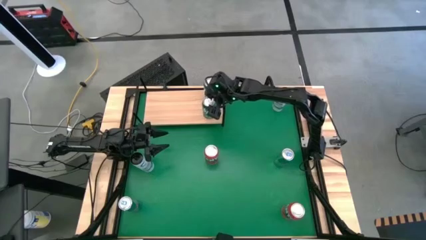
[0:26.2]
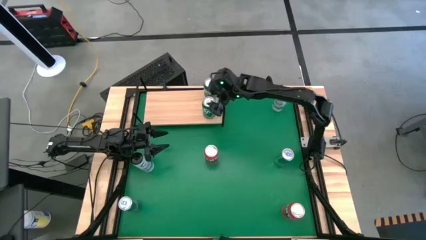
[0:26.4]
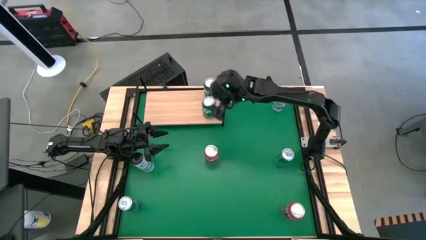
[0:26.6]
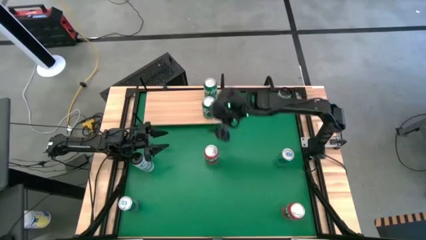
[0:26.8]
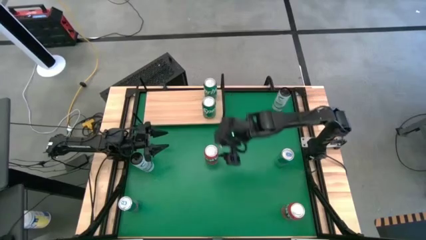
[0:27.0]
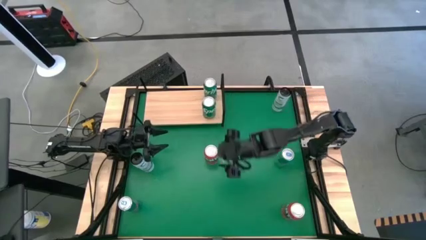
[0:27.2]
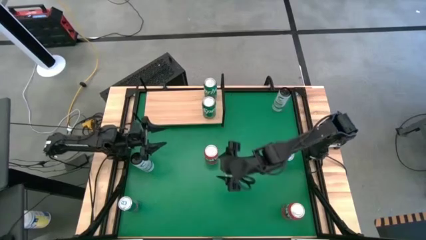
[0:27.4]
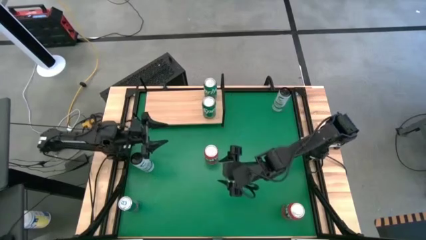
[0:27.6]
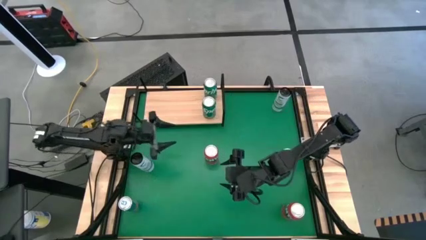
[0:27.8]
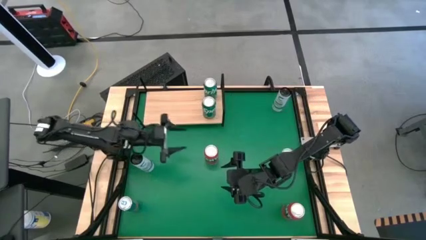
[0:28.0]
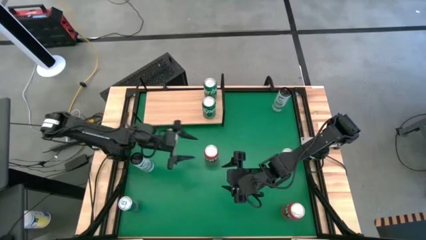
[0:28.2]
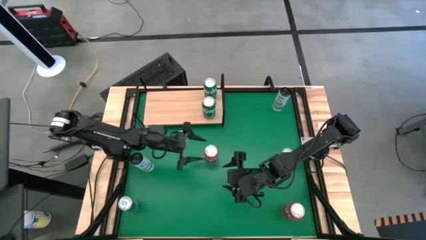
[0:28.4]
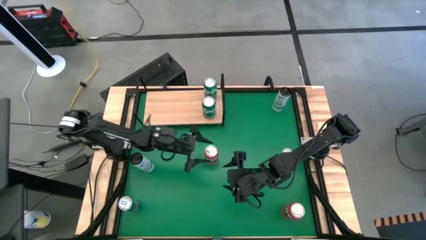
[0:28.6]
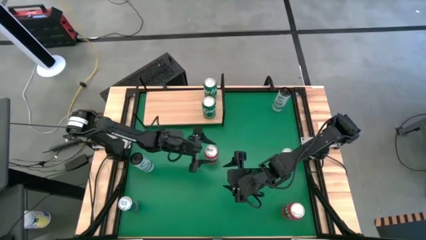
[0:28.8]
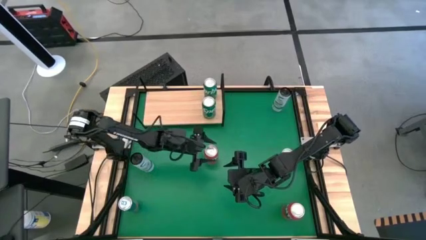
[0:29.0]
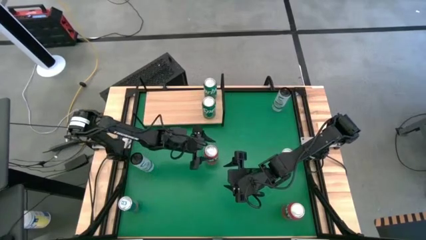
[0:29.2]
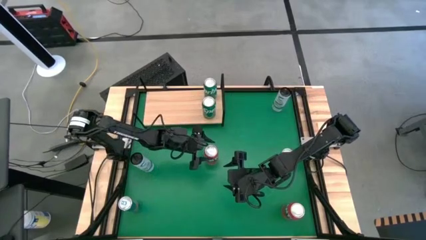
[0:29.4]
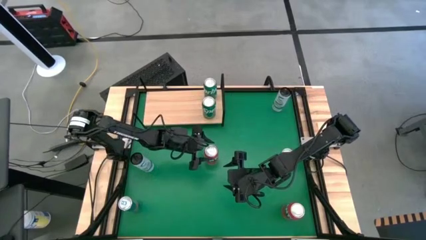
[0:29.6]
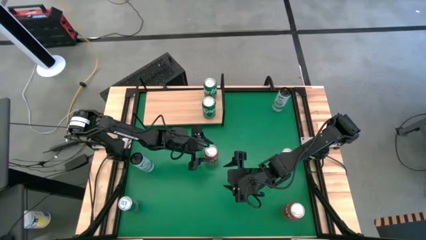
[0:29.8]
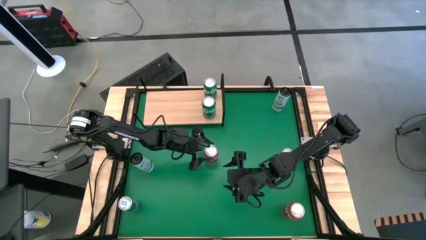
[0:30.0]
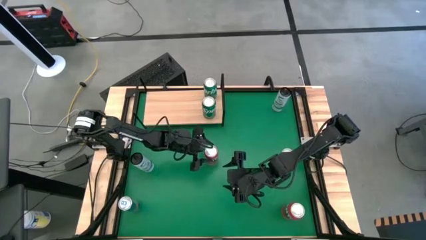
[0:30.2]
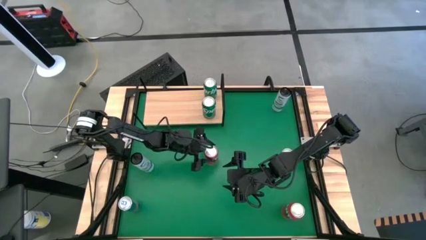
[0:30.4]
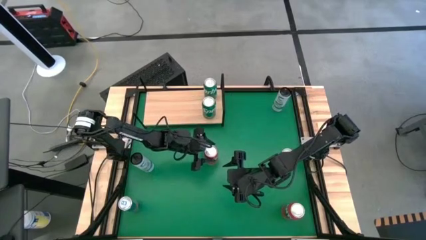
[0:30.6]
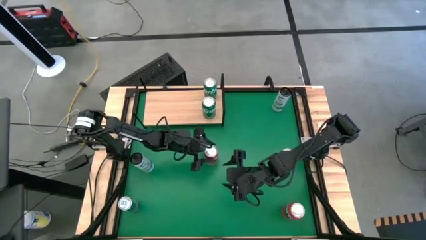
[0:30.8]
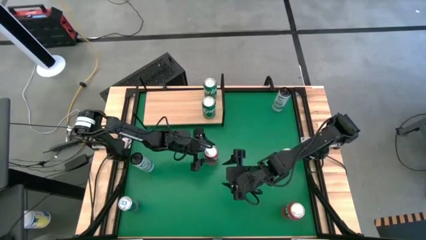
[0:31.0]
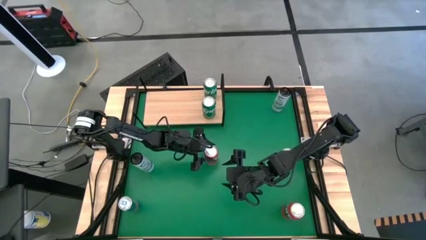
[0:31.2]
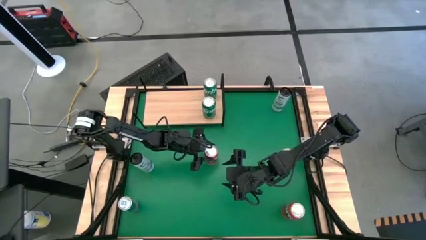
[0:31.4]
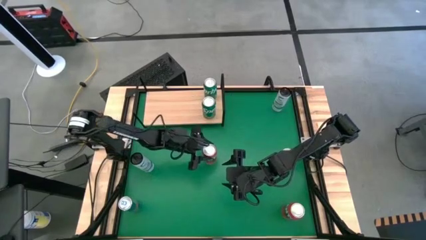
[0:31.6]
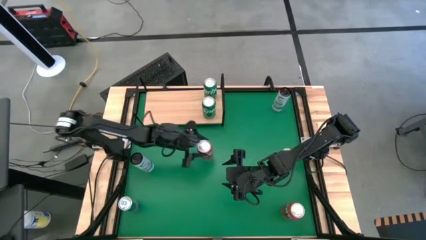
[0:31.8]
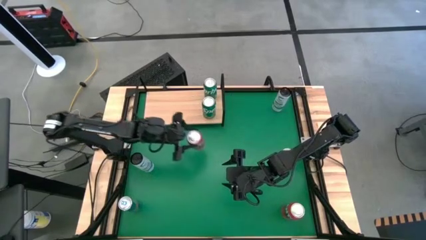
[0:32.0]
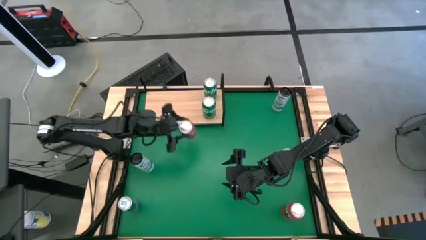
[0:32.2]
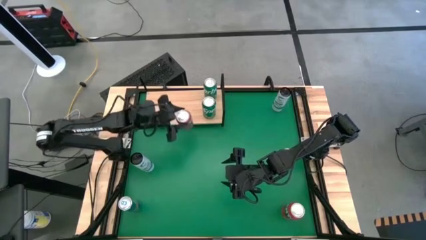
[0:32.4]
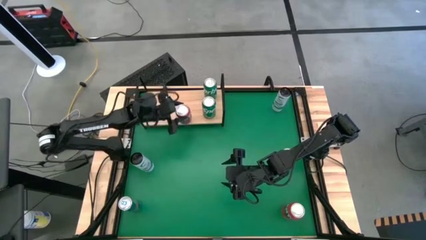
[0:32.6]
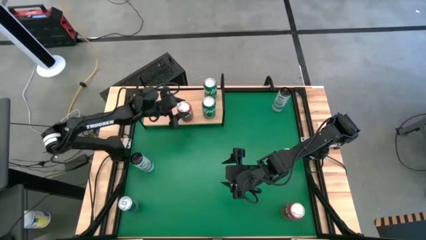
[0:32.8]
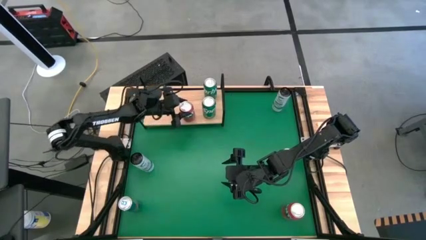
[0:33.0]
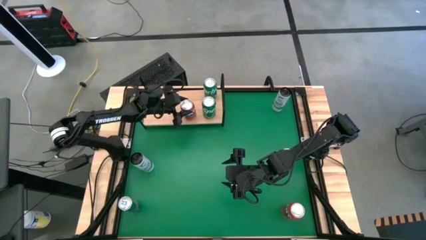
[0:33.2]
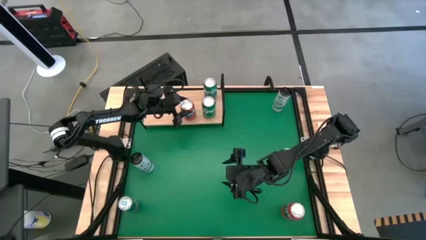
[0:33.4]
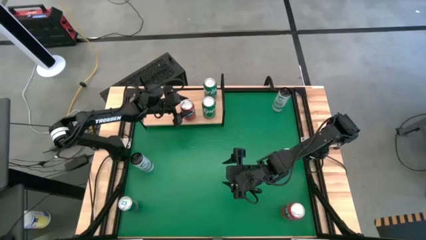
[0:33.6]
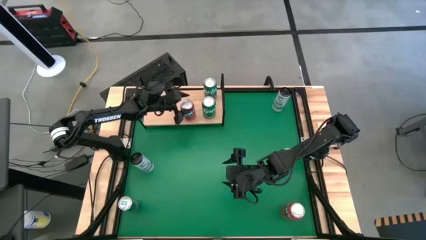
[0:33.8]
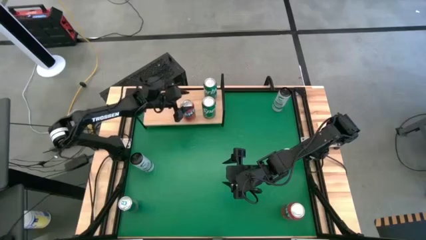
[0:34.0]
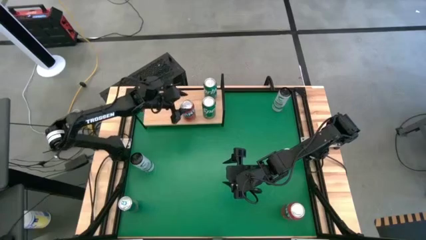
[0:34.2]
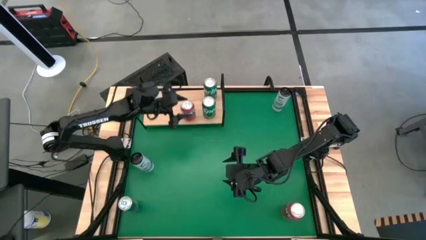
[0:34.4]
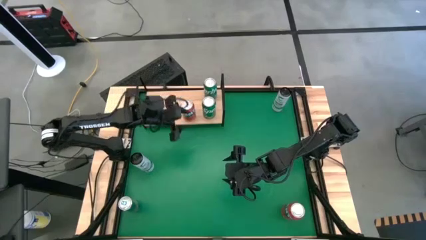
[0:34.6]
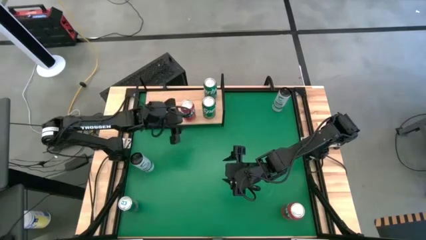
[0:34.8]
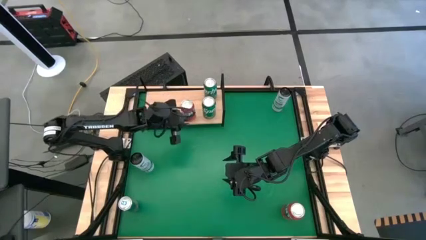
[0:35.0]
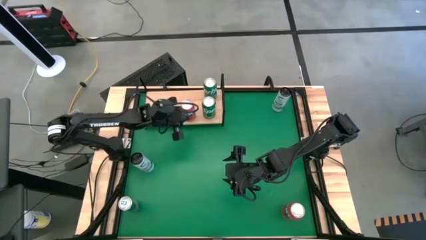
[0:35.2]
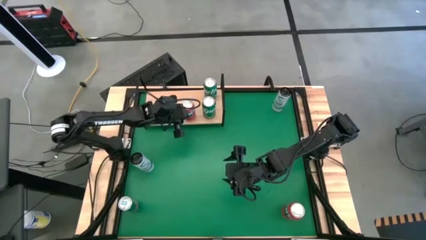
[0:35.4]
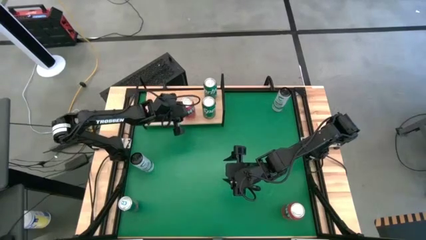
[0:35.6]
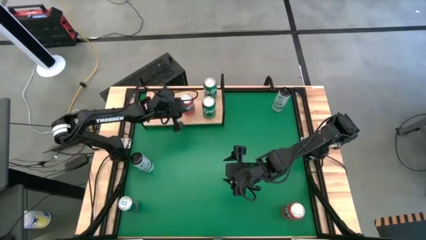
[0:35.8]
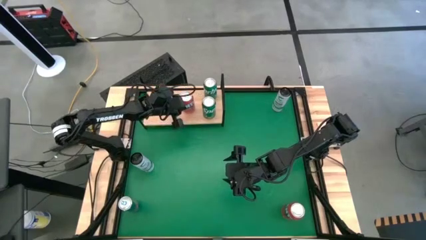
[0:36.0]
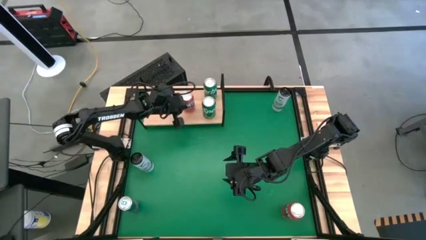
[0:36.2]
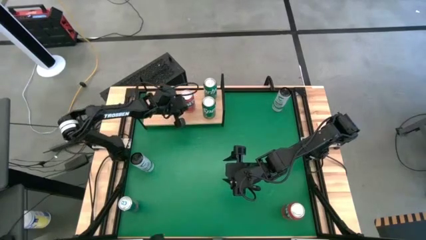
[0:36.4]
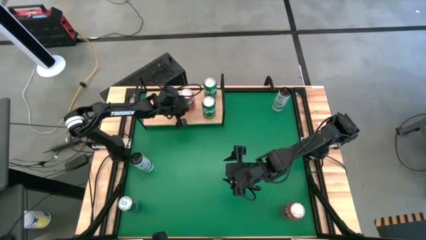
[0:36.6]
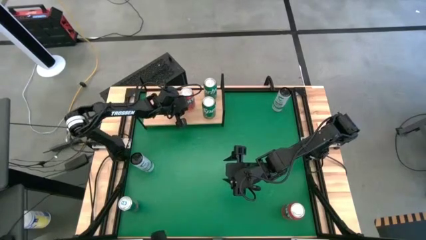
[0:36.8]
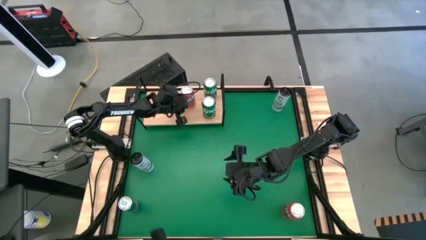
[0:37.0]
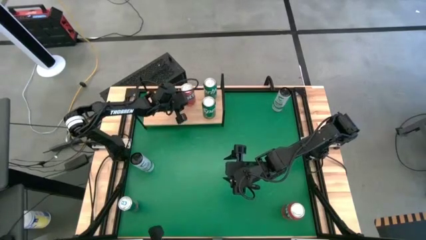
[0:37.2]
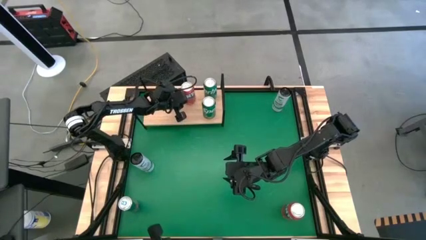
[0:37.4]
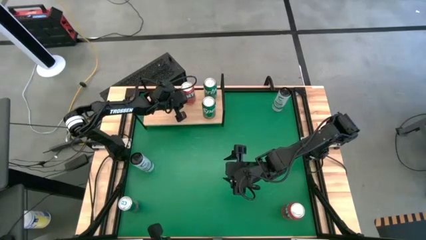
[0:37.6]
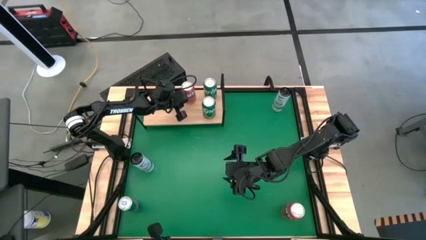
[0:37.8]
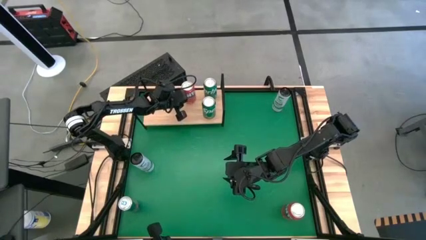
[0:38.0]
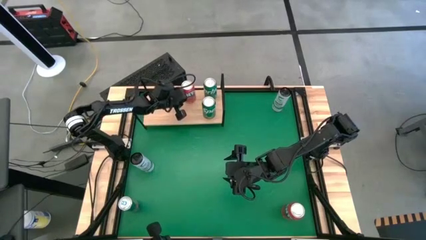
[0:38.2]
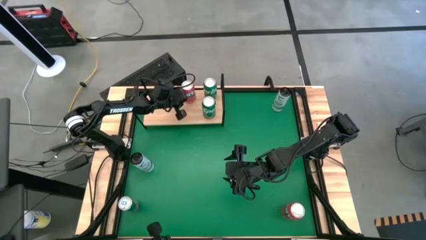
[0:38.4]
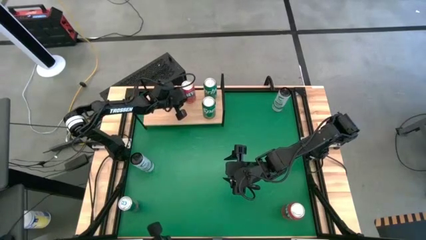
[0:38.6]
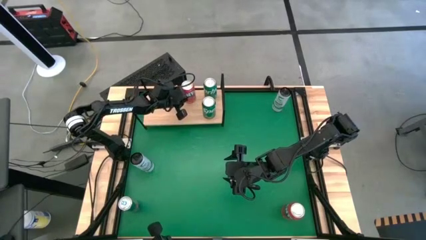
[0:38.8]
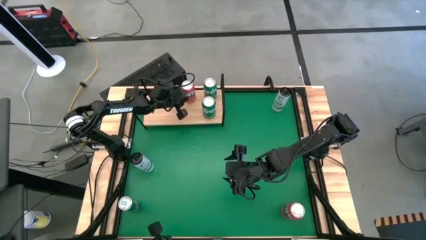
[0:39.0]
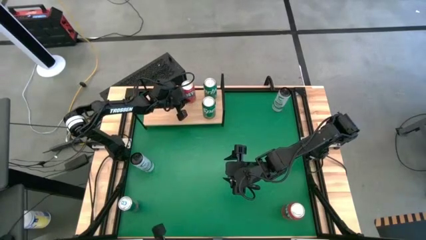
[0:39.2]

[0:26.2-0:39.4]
Task: Place canned beverage on shelf
Put the top orange soda can on the shelf

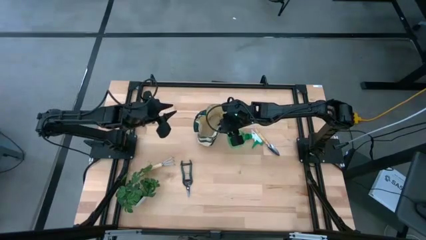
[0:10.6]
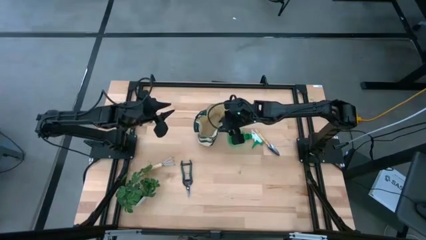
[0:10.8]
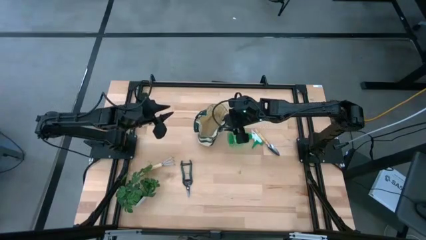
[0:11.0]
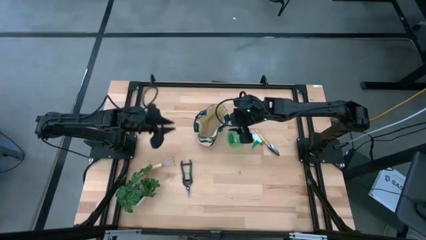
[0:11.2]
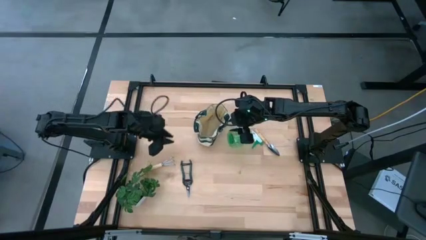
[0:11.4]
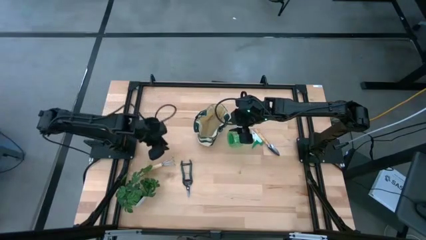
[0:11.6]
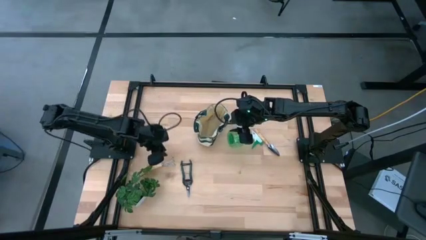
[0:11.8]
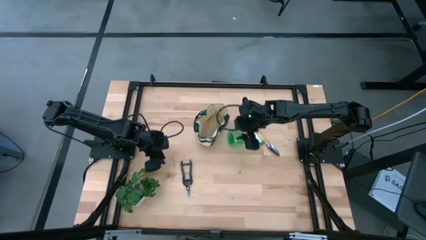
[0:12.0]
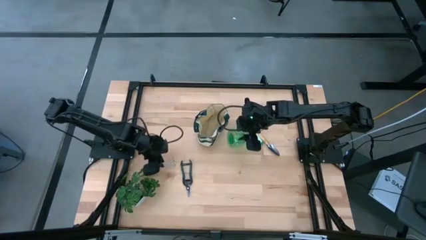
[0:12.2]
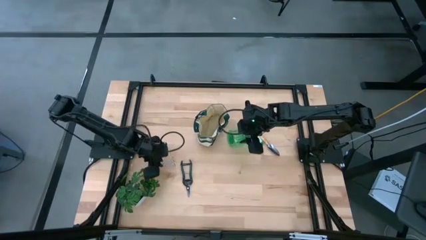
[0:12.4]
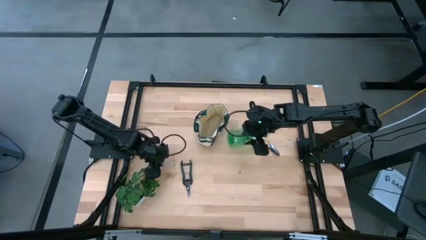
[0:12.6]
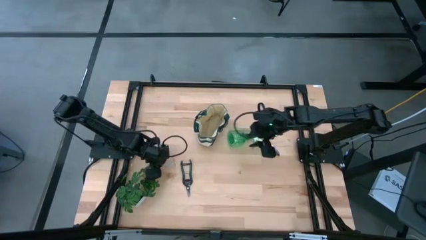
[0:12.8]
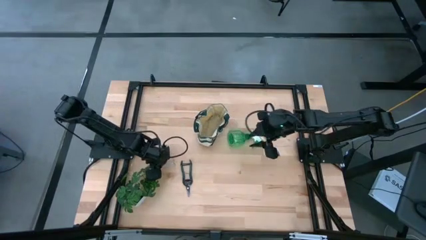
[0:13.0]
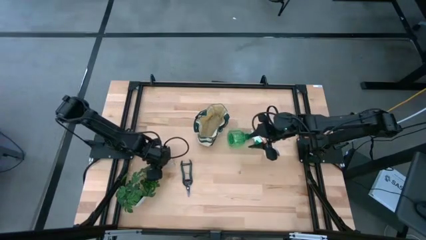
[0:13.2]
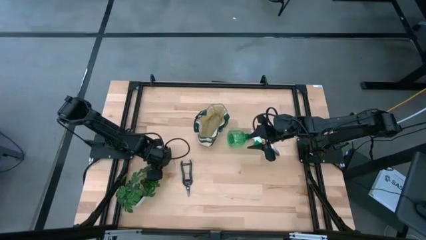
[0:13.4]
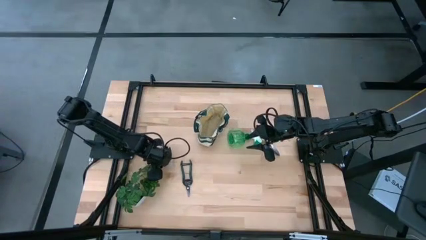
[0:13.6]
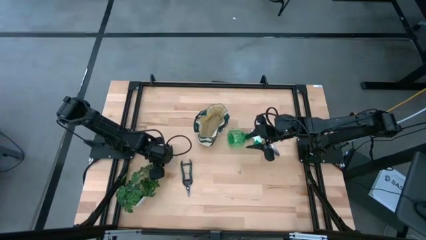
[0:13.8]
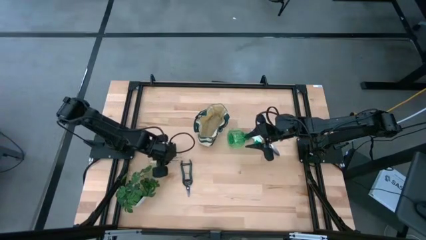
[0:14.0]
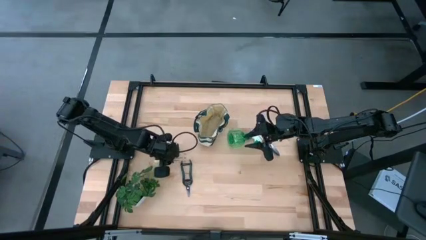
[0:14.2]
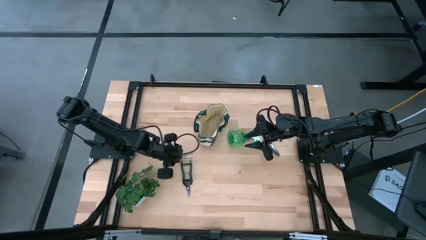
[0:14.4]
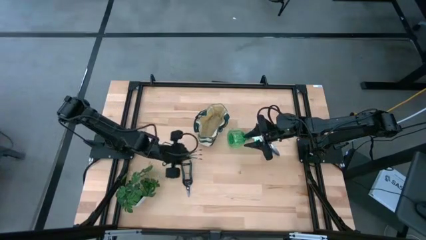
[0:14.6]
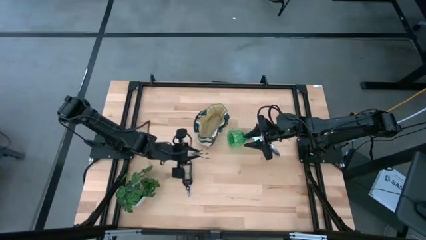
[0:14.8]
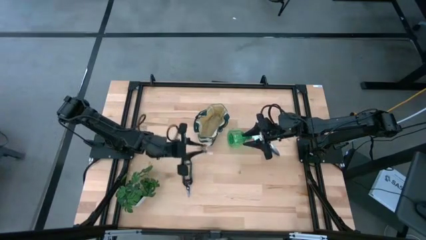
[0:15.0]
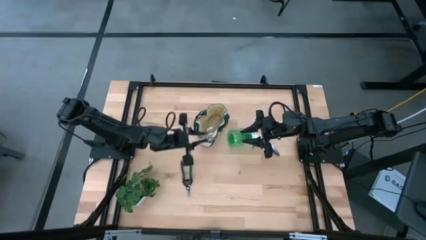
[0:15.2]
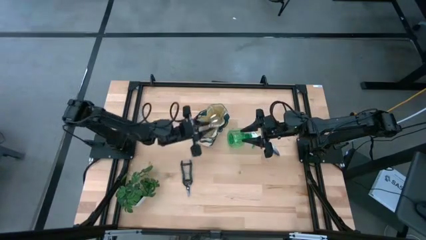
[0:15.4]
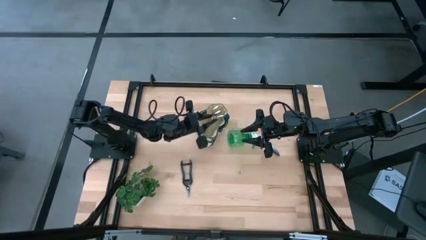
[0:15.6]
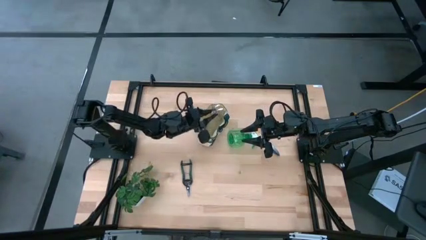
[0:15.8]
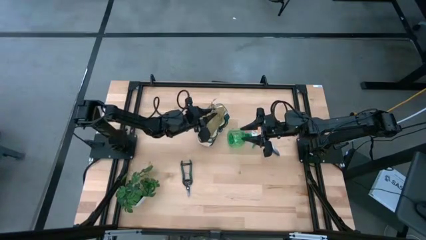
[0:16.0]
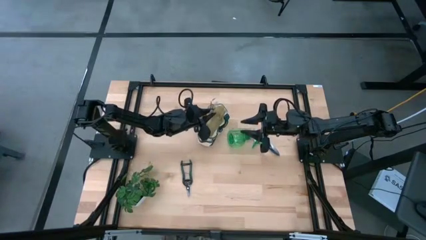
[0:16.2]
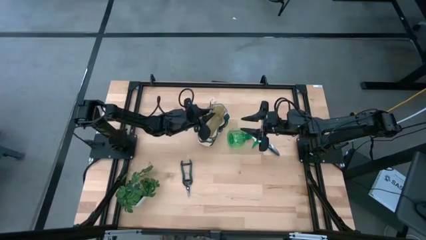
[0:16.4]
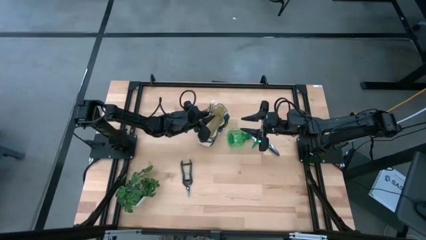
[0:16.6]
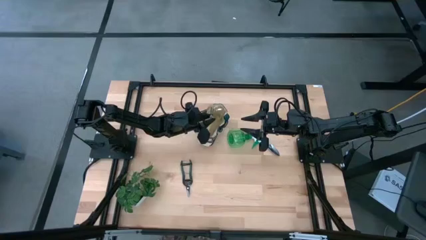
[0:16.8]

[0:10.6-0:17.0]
Task: Pick & Place Garden tools in Gardening bag
Put the brown hand rake into the light brown gardening bag
